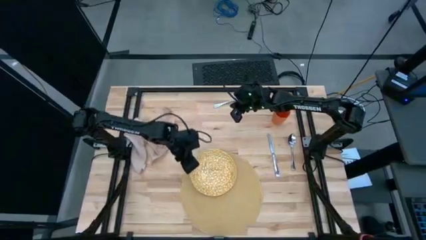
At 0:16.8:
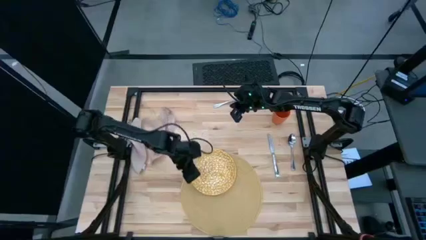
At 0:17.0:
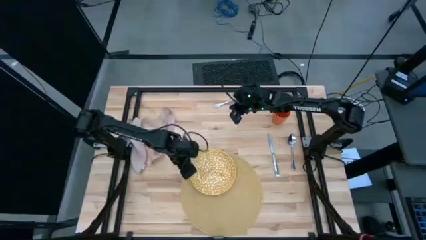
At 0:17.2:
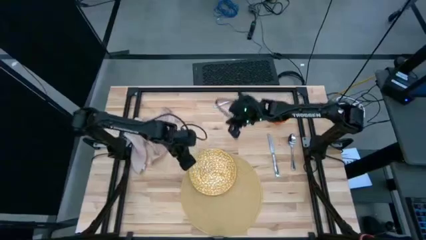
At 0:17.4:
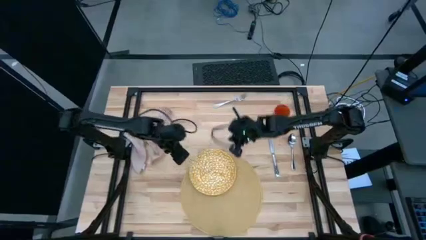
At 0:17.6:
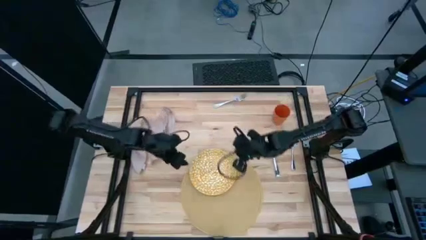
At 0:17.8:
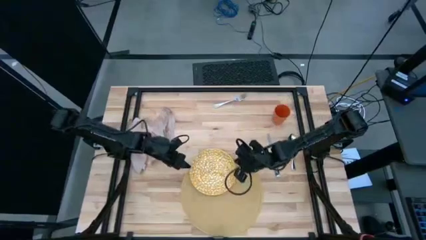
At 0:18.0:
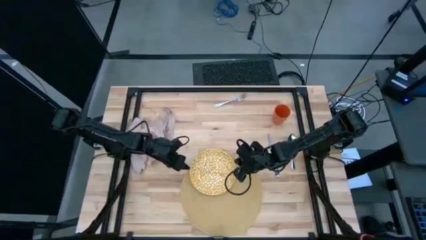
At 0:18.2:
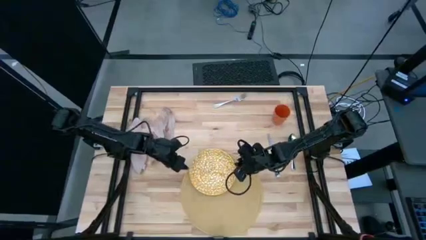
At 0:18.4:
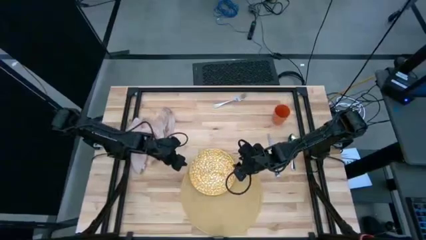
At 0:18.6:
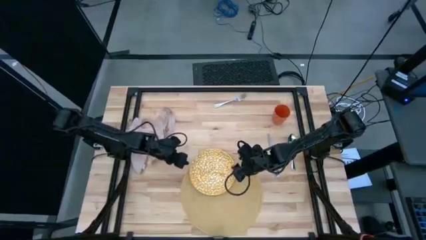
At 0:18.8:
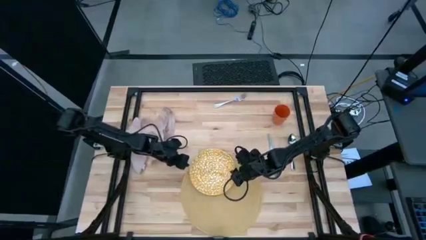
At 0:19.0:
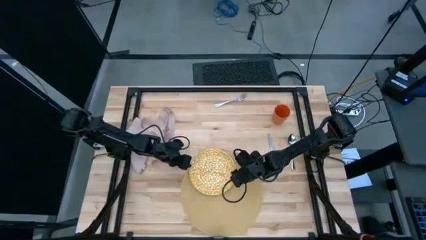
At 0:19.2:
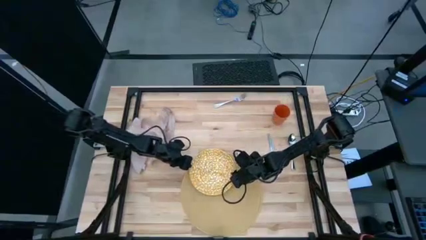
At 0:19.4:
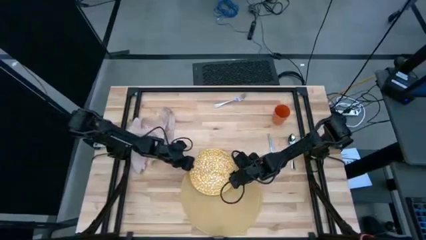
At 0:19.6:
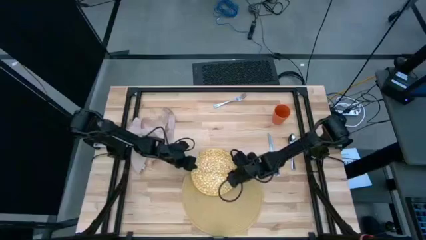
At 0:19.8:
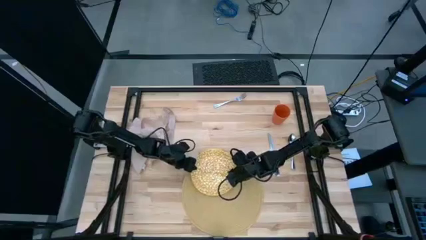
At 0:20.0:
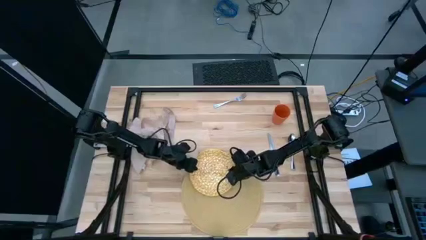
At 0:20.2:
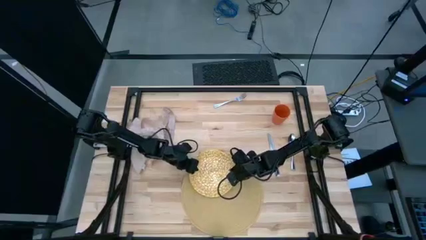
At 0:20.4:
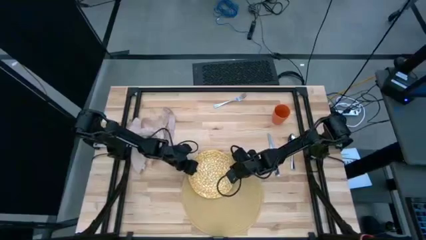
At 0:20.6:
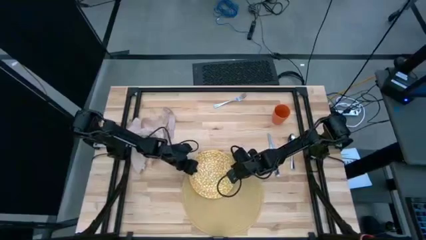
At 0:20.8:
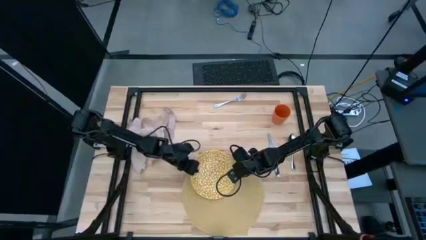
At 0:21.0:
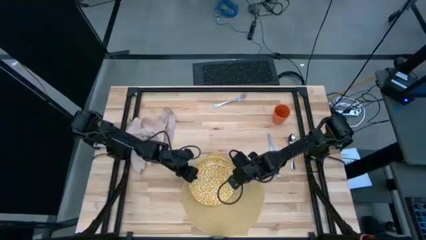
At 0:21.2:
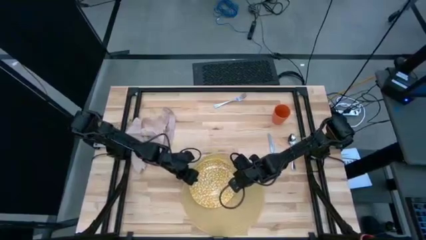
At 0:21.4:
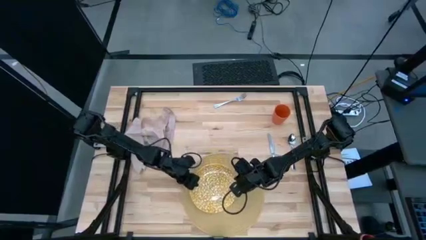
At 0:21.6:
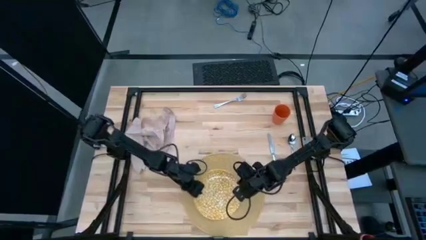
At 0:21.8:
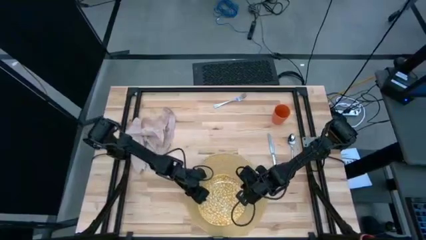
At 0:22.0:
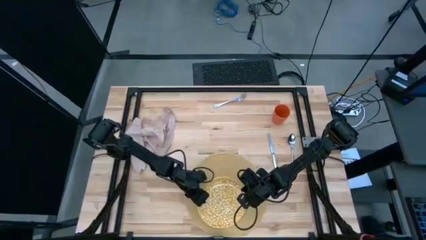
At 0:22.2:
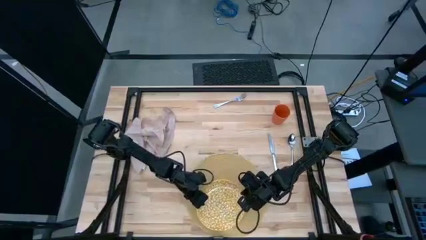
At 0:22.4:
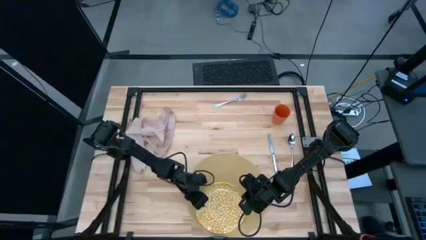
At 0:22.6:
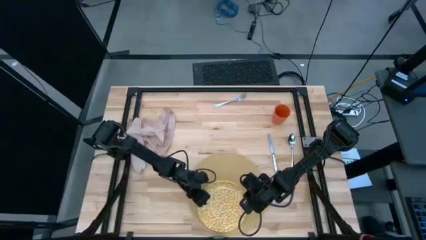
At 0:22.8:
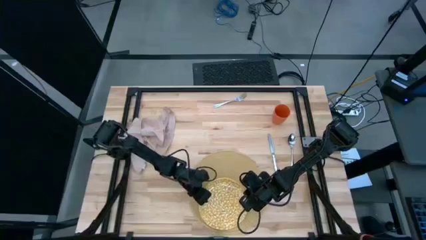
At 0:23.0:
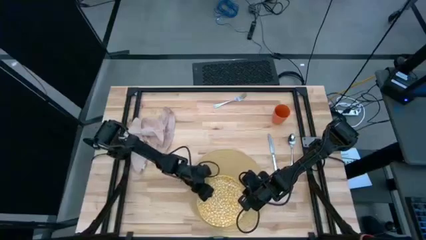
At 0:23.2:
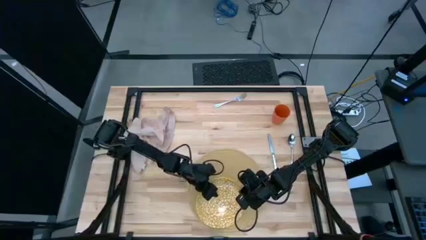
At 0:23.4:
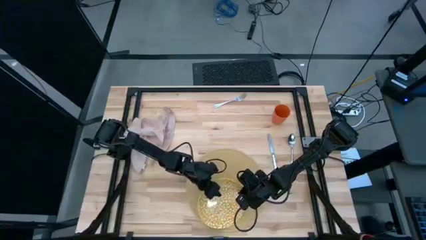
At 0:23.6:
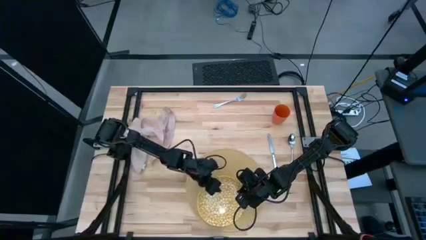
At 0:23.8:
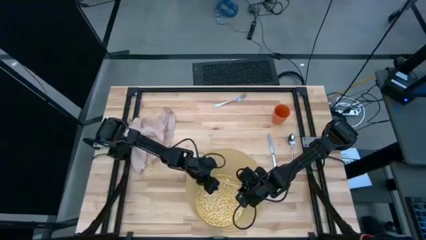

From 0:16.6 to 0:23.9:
Task: Set table place
Put the yellow plate on the brown table mat

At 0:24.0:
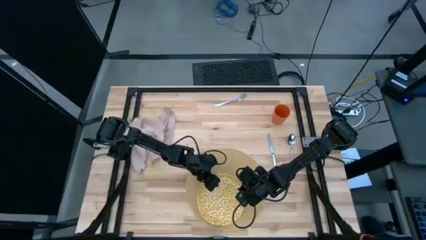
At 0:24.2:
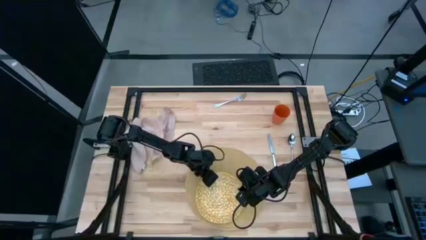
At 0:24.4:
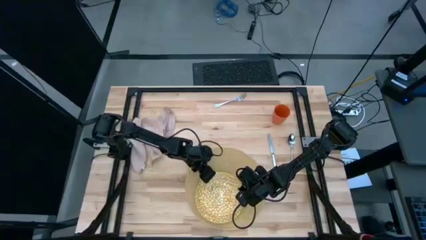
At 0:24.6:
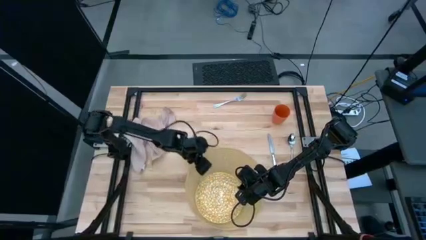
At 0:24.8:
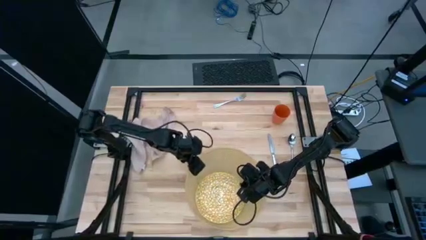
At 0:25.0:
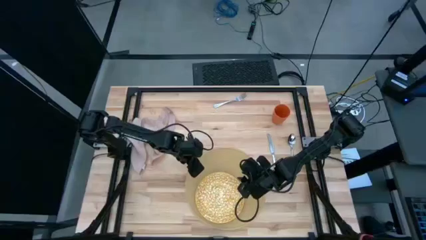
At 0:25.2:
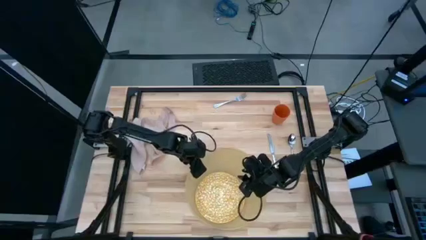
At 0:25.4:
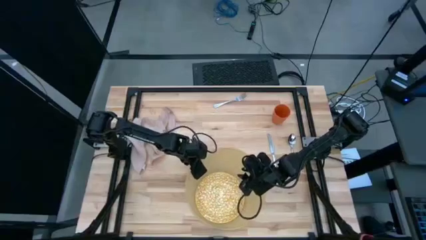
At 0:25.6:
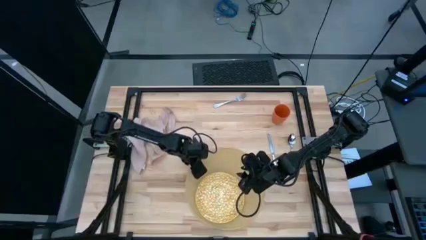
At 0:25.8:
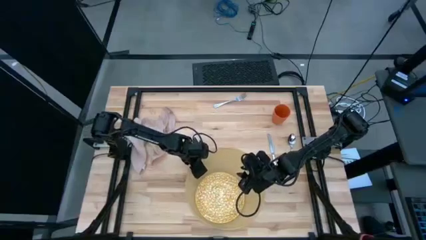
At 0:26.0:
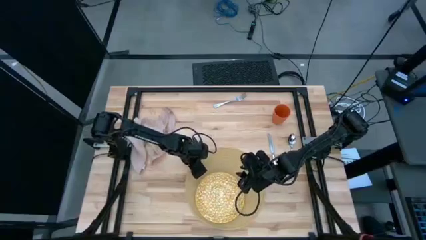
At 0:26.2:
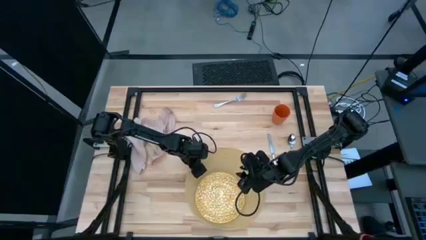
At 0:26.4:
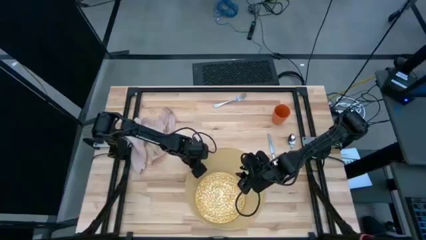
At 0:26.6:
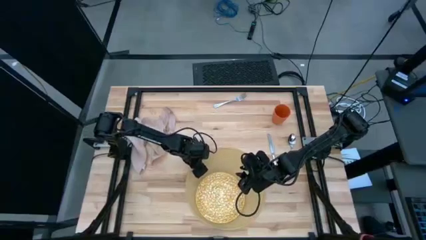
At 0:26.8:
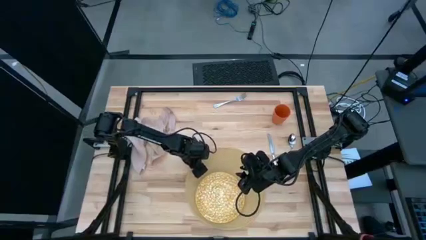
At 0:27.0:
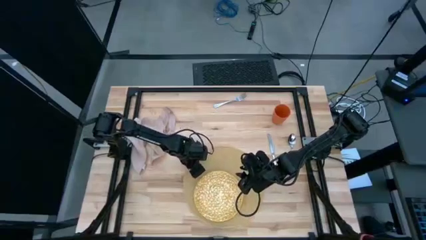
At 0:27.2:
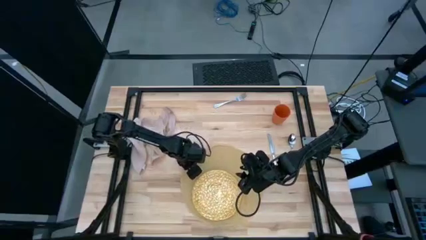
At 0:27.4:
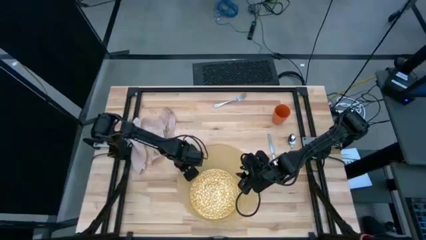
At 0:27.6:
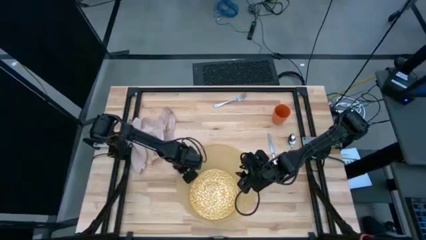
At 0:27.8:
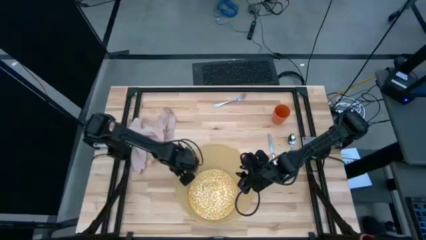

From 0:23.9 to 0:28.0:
Adjust the brown table mat

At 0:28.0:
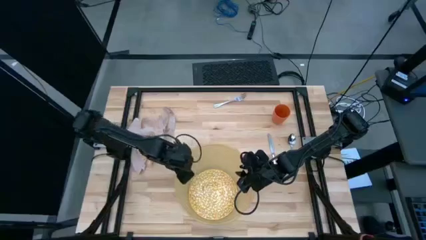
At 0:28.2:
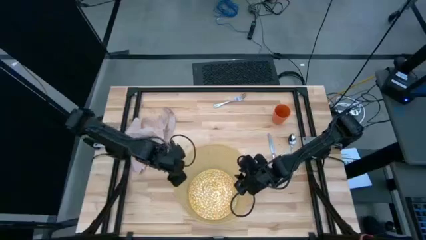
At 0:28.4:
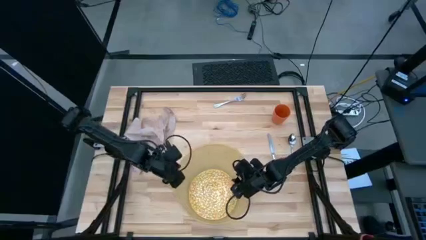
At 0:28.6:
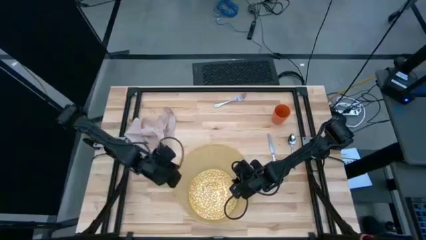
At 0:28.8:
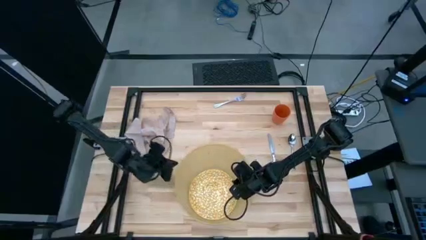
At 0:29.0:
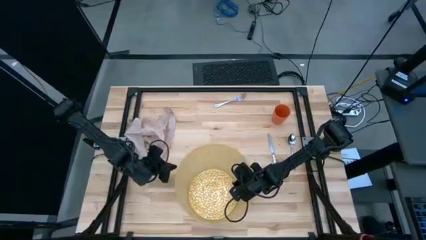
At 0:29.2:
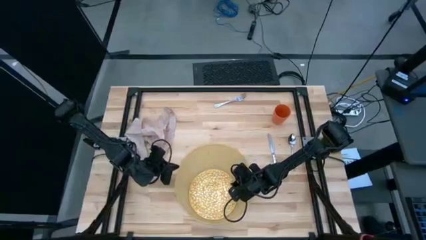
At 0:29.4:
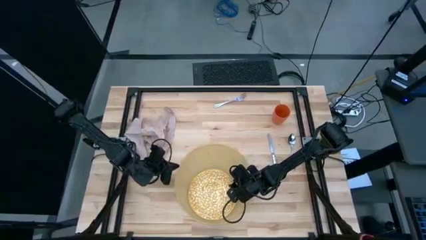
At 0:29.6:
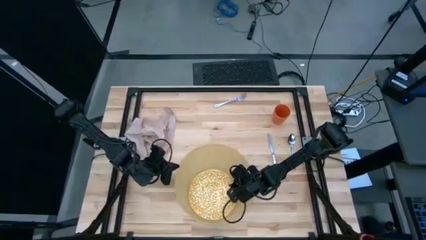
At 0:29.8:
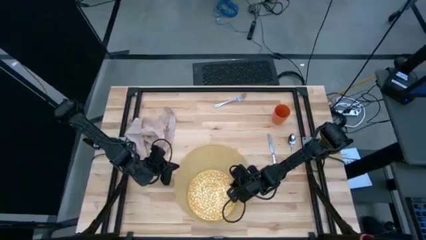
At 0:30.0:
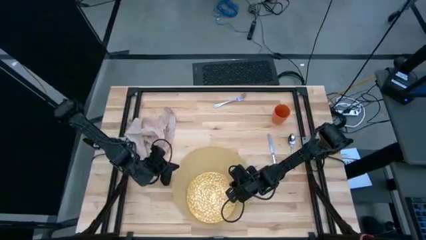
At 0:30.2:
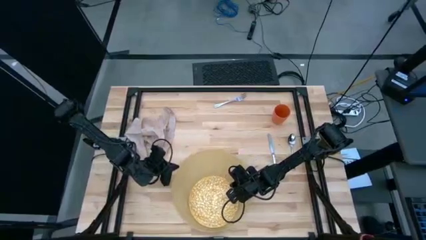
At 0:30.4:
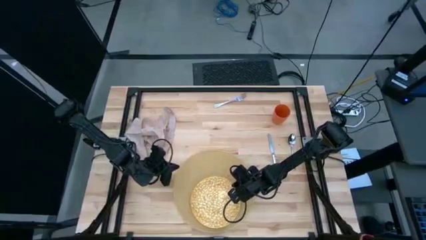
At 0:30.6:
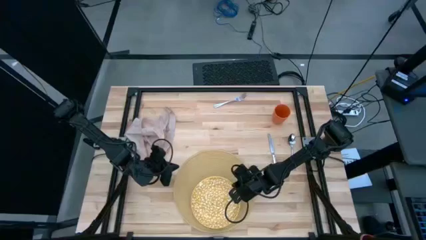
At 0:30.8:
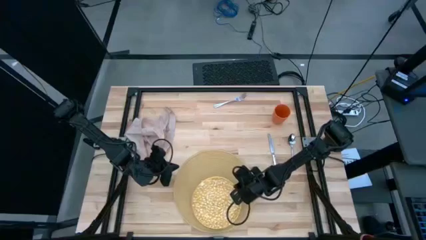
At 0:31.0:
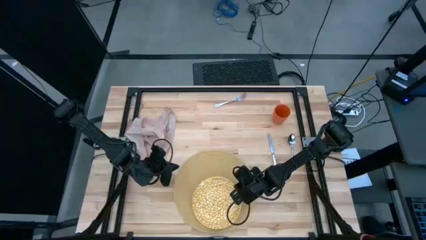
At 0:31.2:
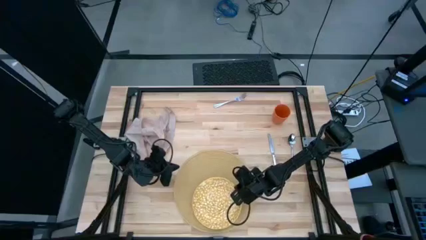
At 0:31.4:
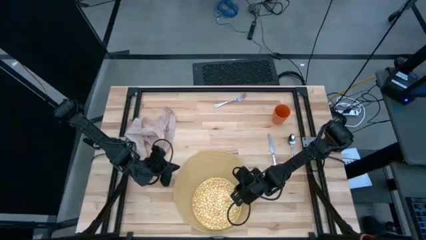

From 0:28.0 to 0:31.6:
Adjust the yellow plate

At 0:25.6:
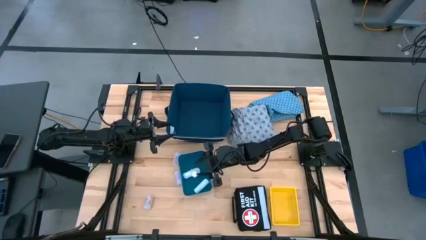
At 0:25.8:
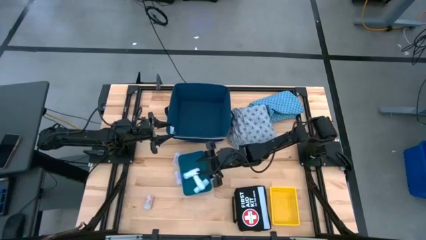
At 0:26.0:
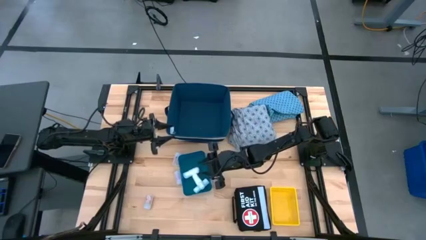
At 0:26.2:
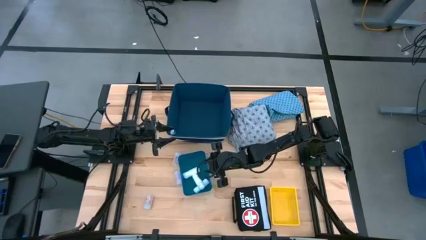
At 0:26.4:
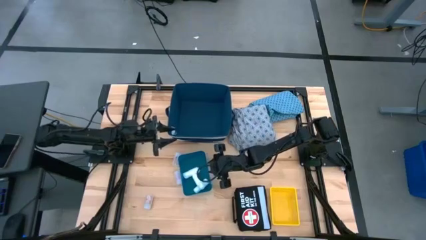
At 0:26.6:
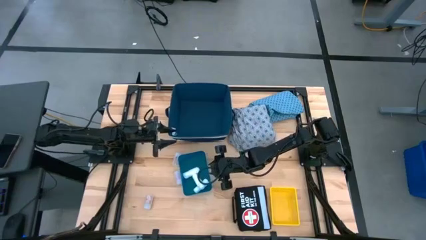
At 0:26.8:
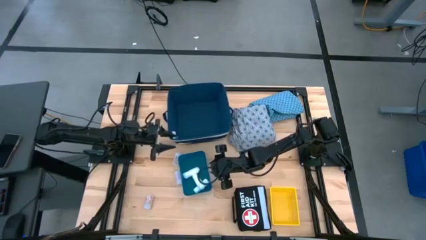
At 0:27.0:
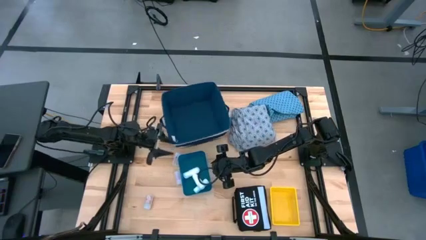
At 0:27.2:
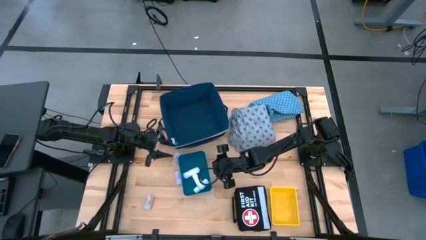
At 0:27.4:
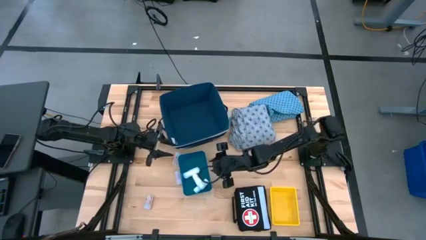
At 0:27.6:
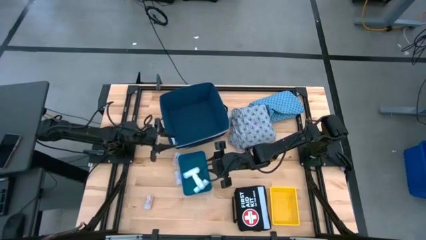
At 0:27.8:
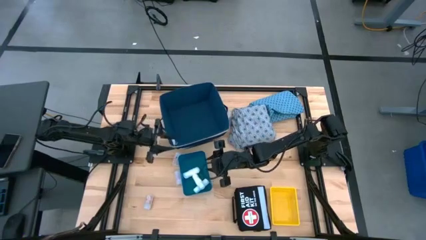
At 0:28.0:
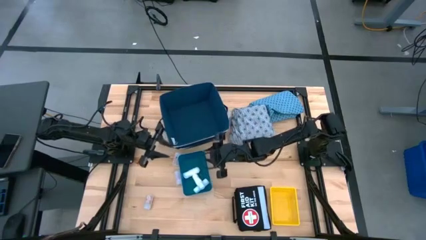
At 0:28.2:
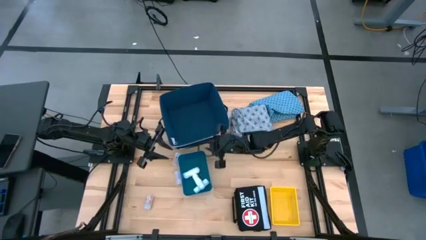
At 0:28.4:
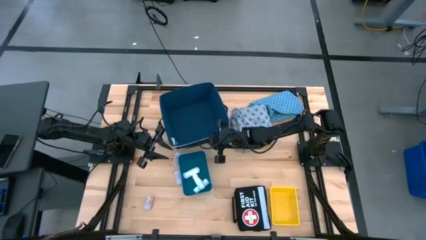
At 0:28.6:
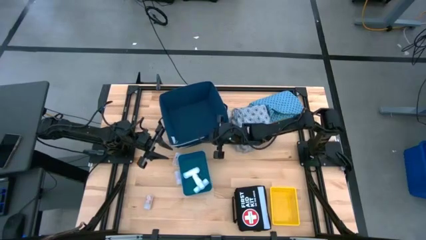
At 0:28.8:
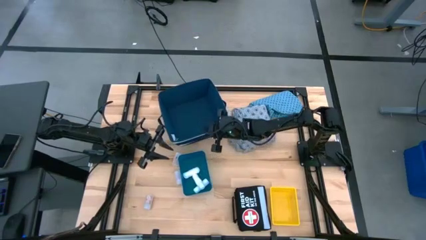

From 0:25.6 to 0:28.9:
Task: Pick & place medical supplies in basket/bin
Adjust the blue bin
